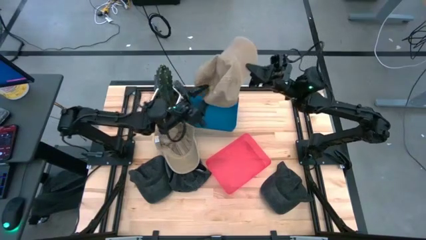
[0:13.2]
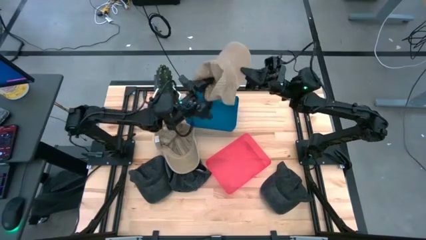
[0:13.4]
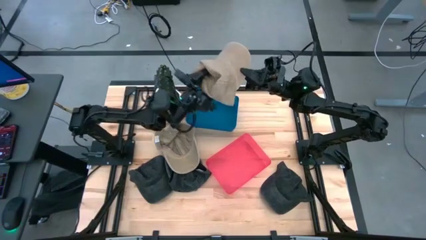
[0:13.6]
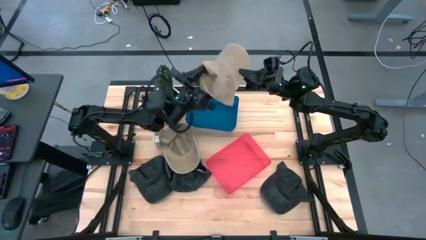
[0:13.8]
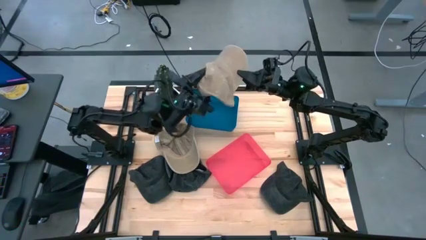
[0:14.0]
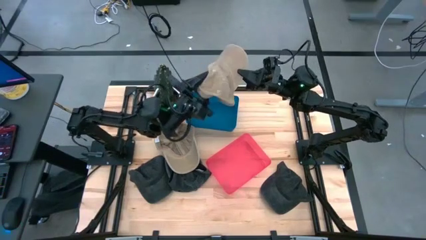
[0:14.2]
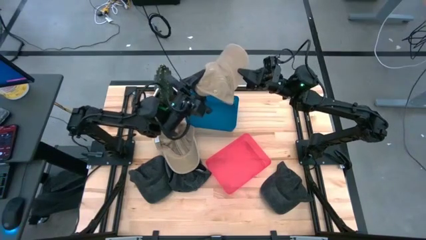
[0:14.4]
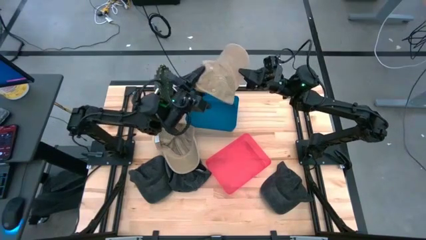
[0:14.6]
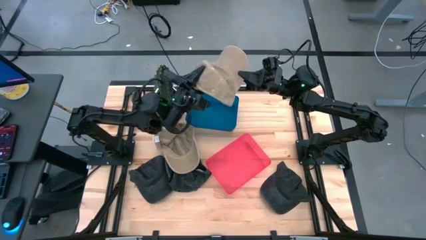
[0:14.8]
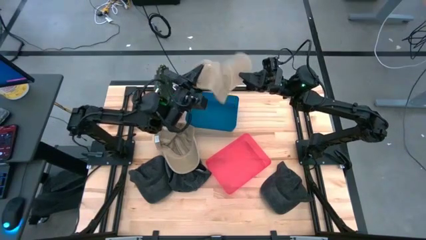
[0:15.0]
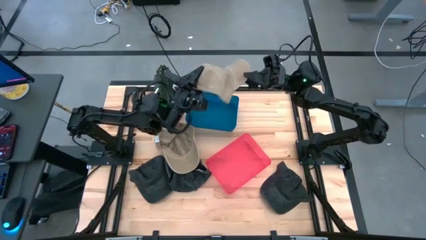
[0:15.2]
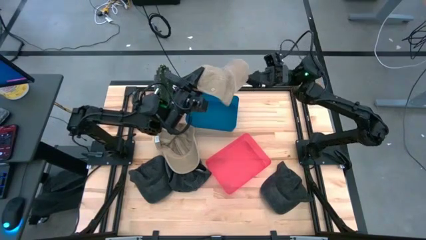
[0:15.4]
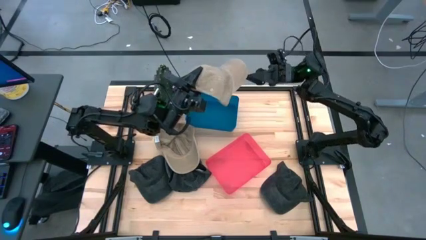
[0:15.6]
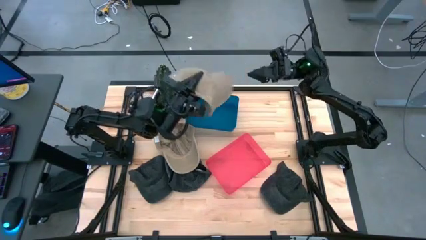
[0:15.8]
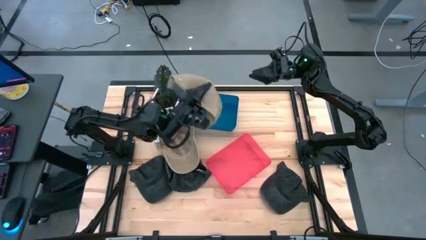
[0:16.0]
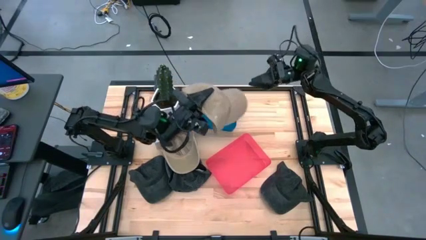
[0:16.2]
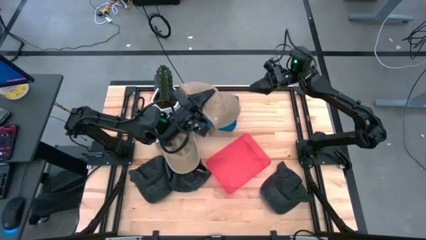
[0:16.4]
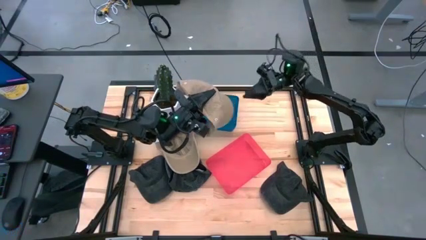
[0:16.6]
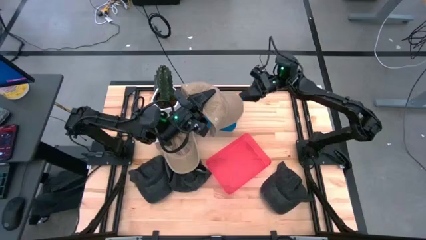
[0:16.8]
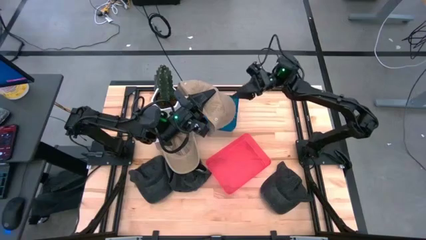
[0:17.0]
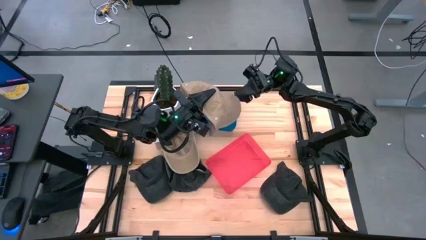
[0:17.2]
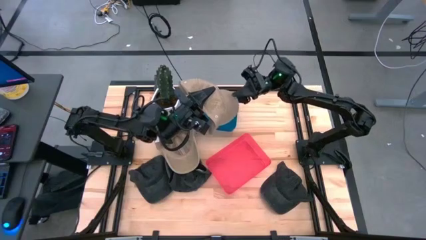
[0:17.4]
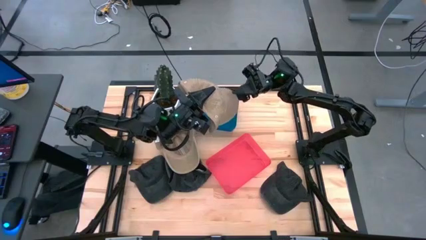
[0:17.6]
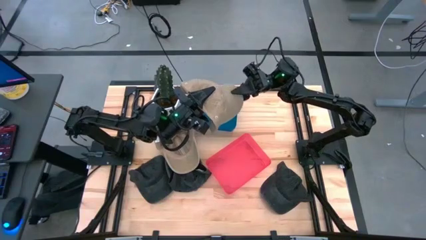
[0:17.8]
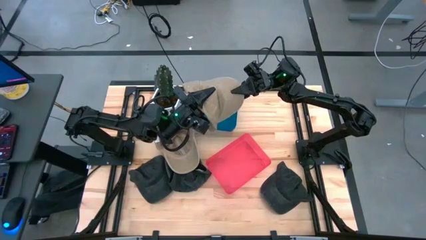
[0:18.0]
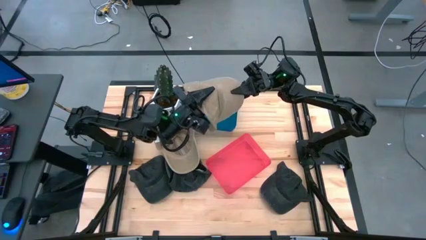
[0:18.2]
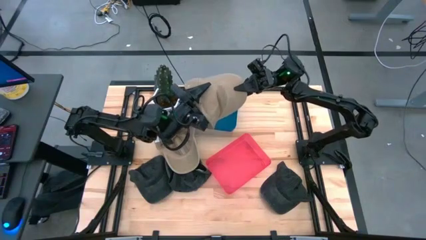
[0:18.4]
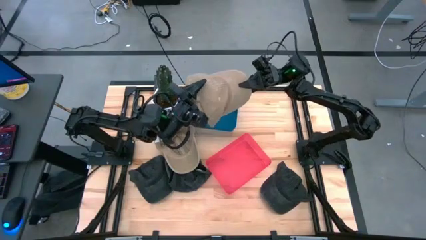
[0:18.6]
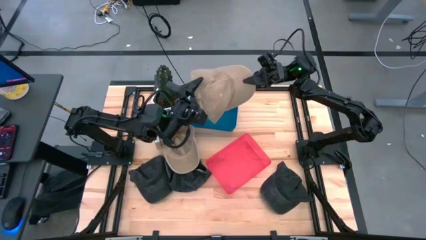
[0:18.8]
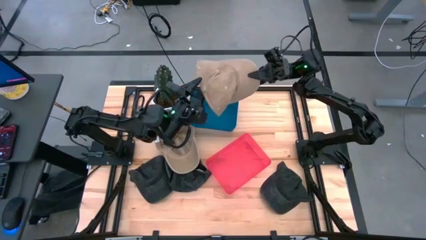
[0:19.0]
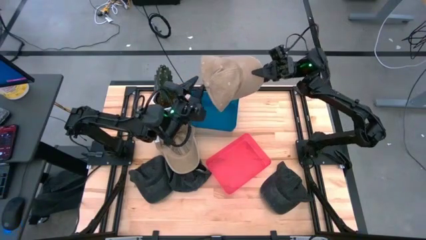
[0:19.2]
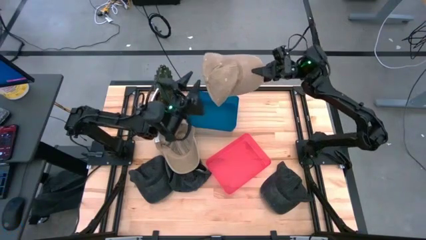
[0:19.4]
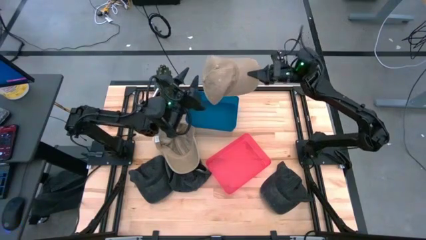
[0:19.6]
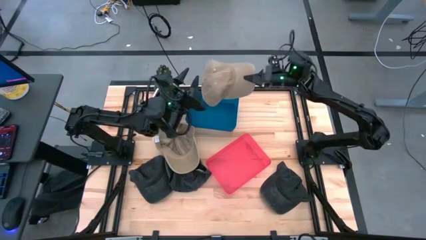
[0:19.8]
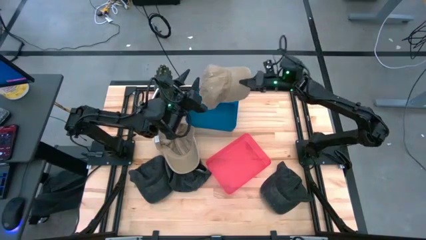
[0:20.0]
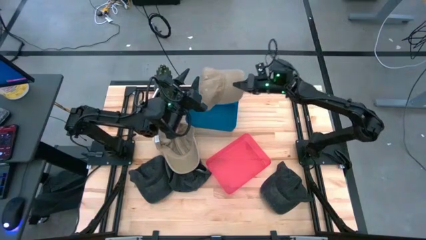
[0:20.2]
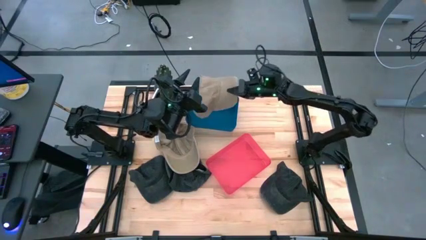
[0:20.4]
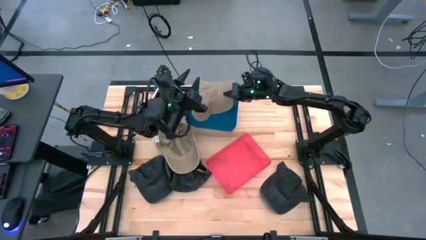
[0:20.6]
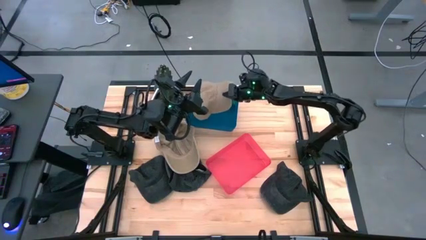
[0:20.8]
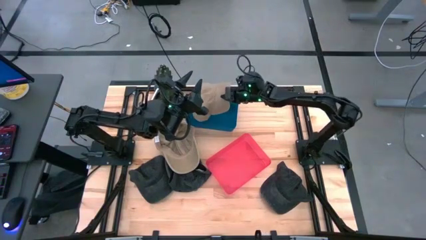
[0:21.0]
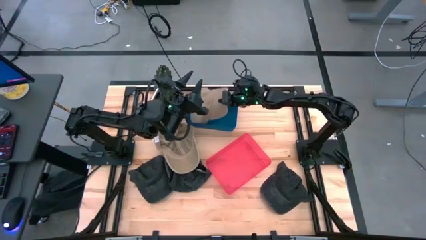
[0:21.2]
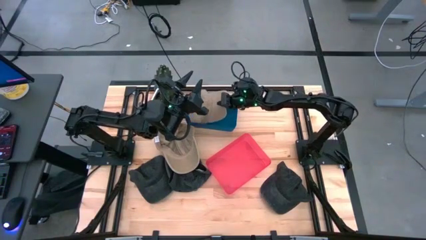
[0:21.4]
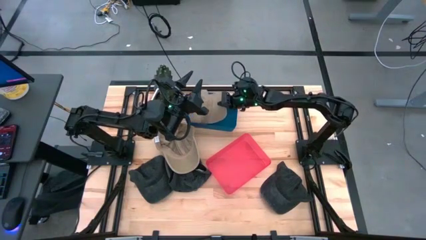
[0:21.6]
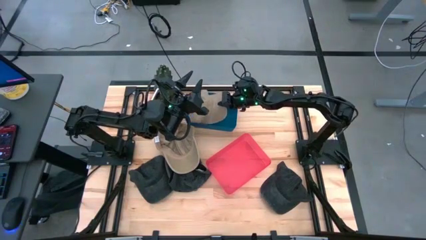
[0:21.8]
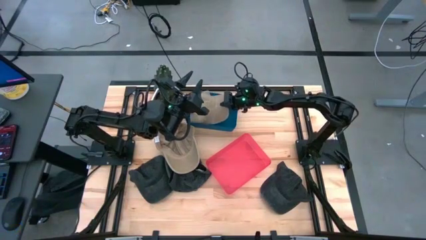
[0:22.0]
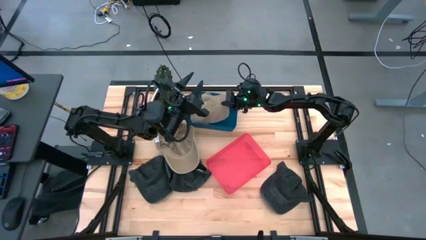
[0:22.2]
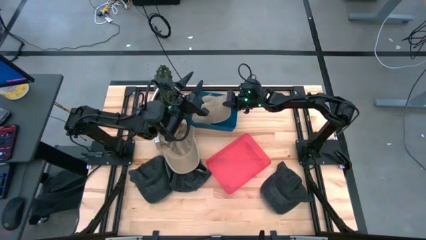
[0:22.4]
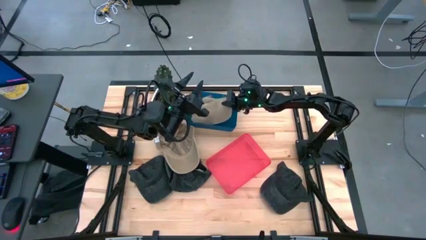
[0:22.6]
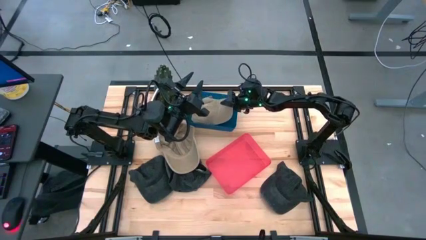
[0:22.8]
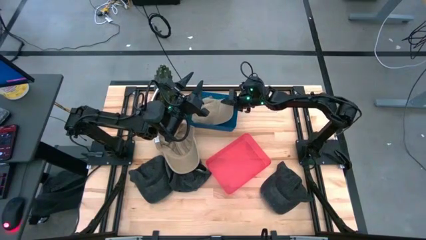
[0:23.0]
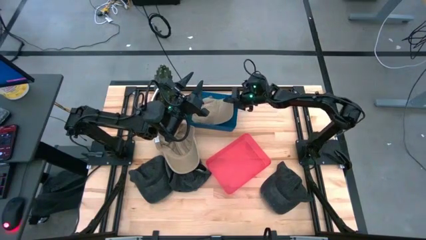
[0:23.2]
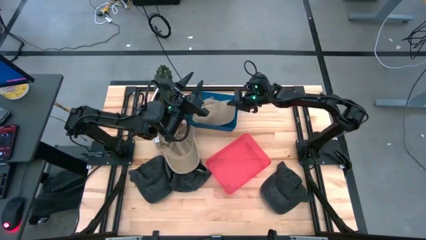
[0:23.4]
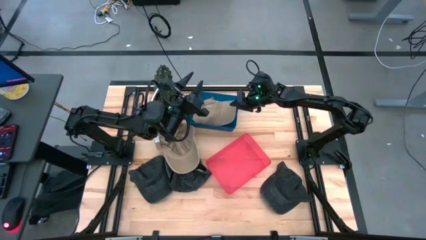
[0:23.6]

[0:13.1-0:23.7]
Task: Pick & Place hat
Put the top brown cap into the blue bin
